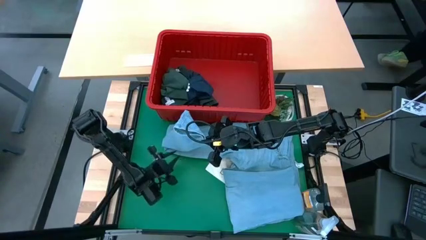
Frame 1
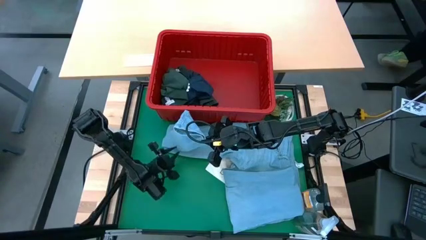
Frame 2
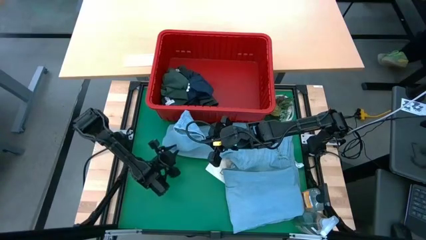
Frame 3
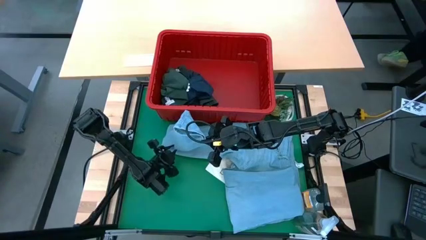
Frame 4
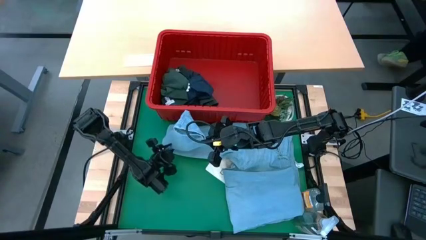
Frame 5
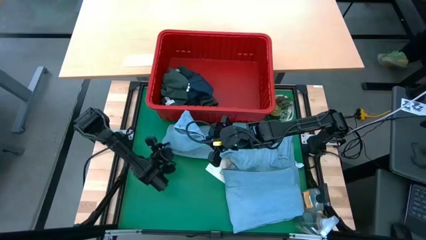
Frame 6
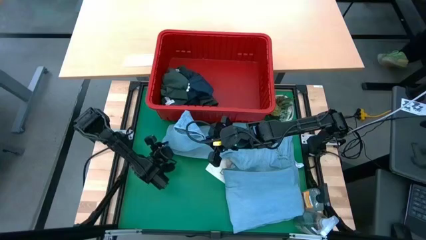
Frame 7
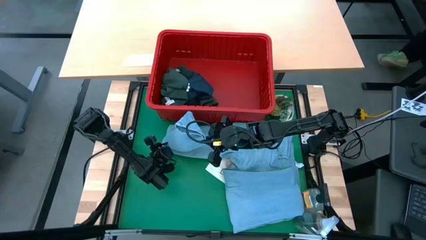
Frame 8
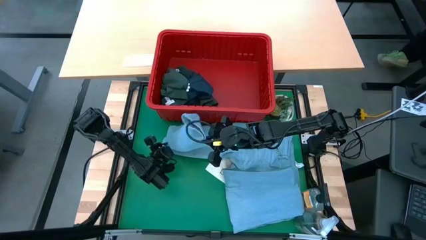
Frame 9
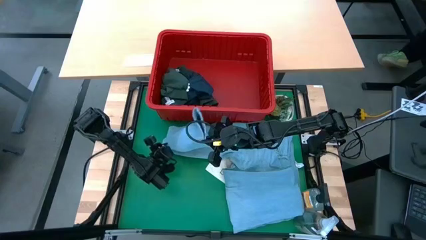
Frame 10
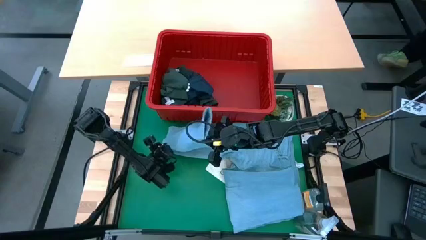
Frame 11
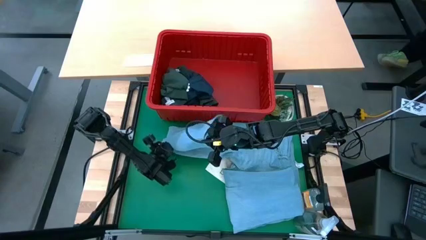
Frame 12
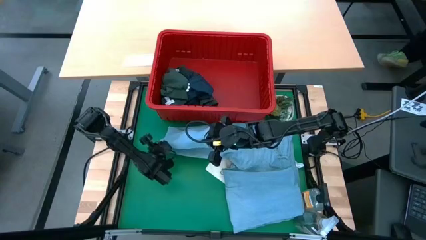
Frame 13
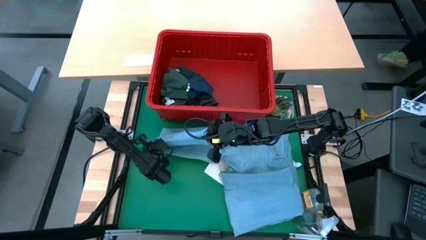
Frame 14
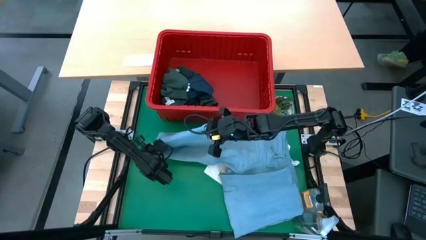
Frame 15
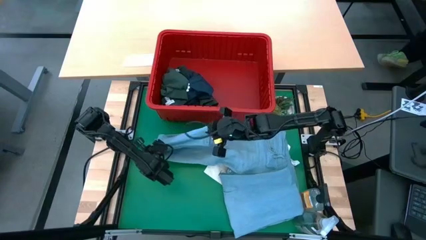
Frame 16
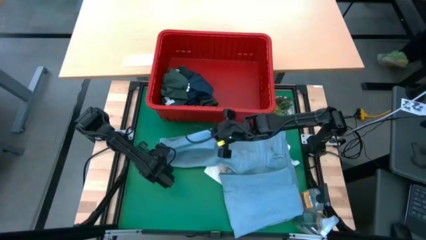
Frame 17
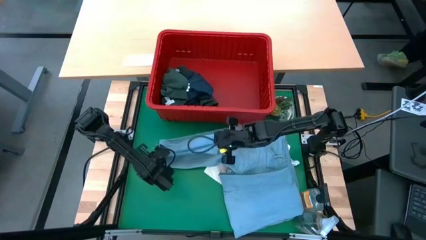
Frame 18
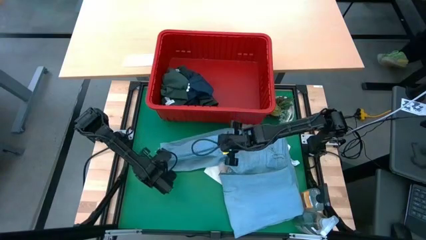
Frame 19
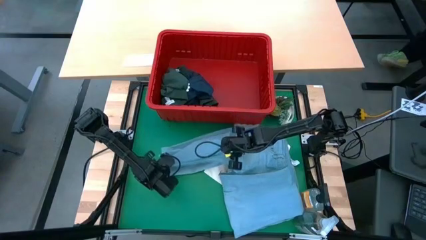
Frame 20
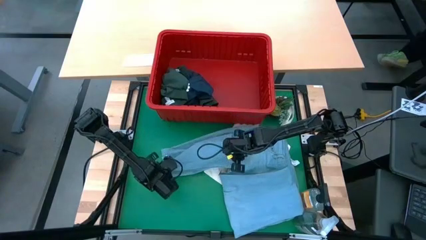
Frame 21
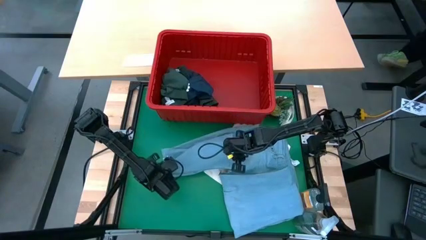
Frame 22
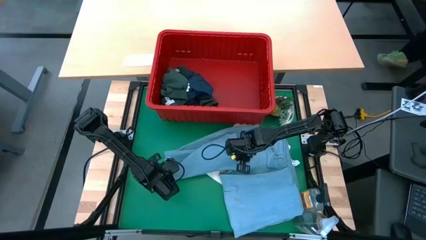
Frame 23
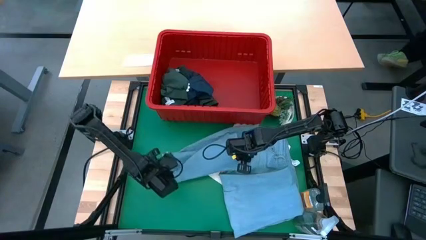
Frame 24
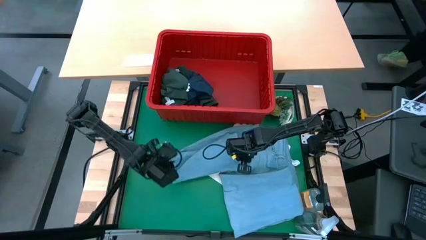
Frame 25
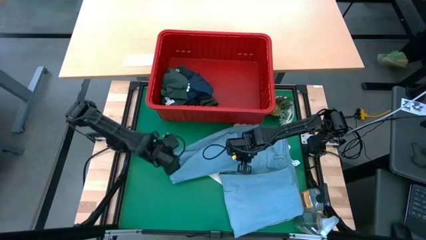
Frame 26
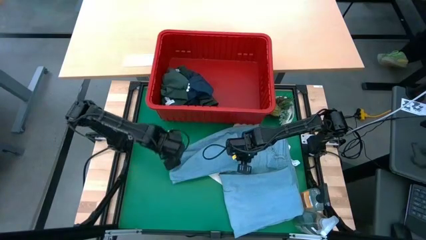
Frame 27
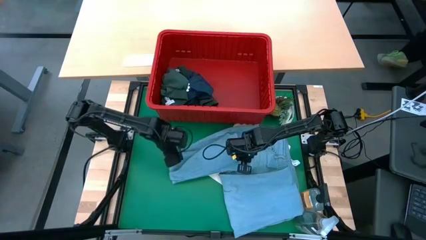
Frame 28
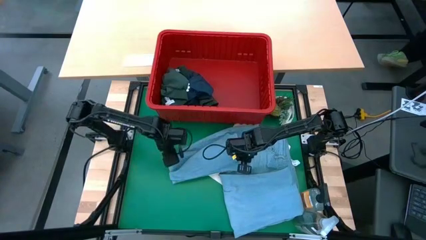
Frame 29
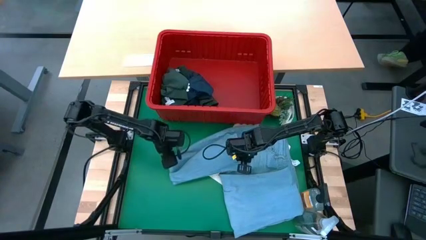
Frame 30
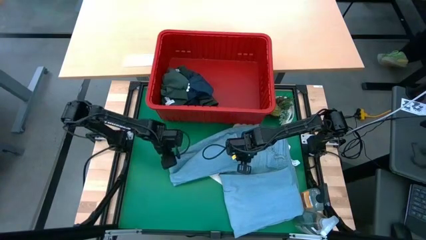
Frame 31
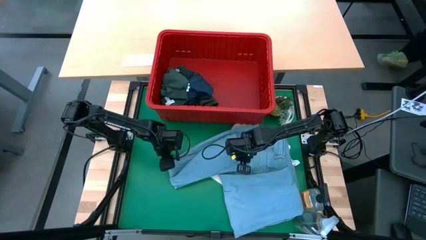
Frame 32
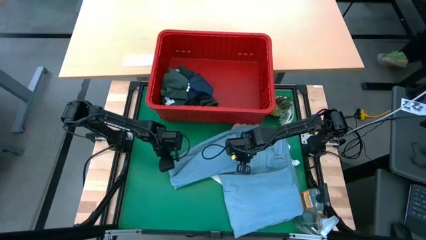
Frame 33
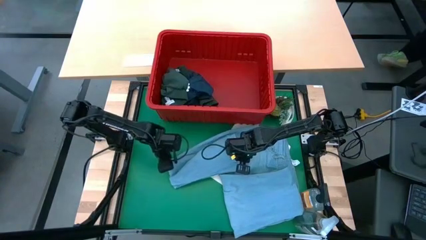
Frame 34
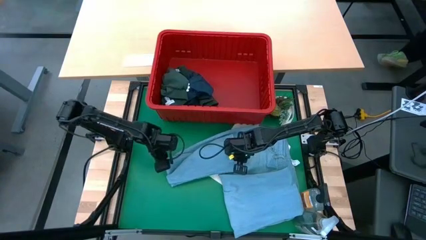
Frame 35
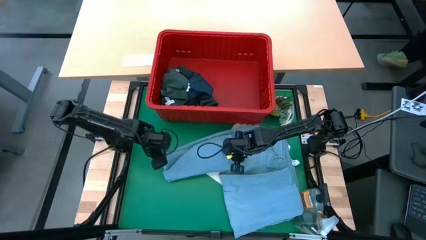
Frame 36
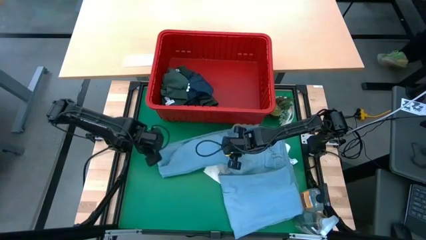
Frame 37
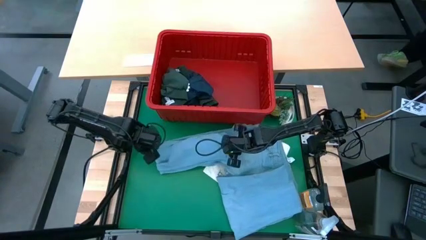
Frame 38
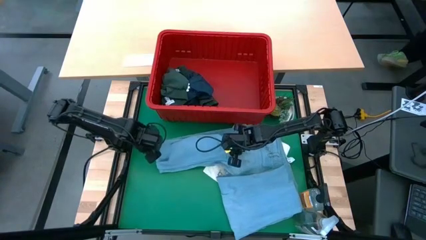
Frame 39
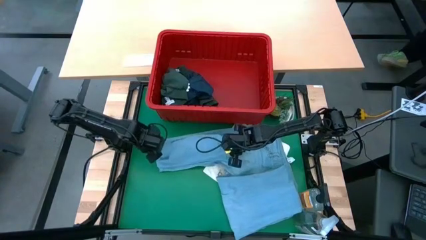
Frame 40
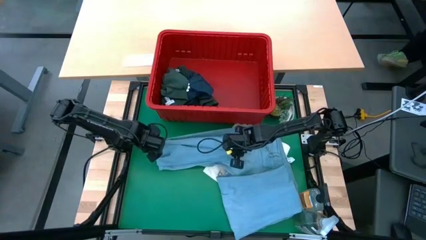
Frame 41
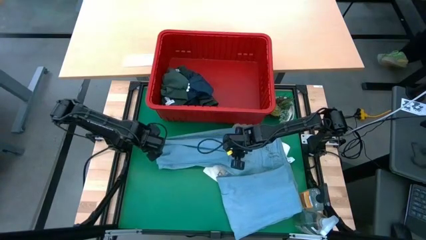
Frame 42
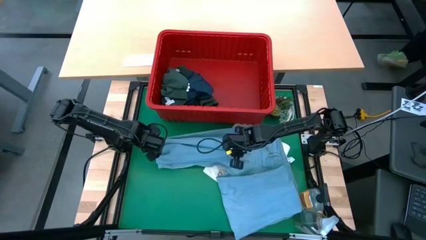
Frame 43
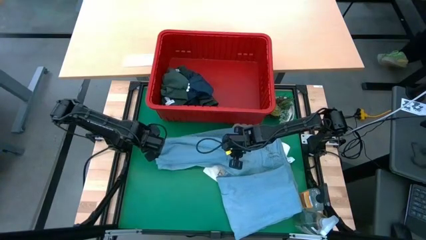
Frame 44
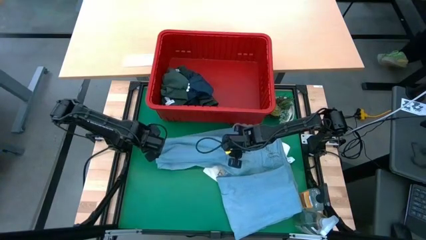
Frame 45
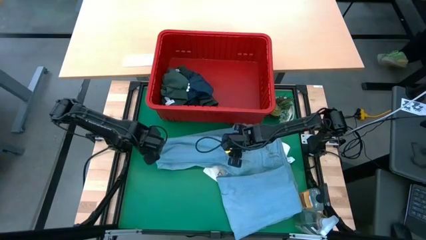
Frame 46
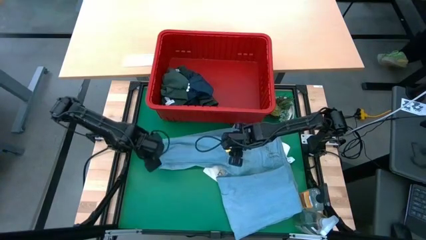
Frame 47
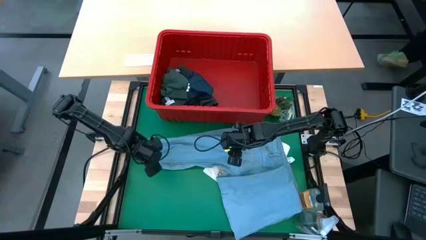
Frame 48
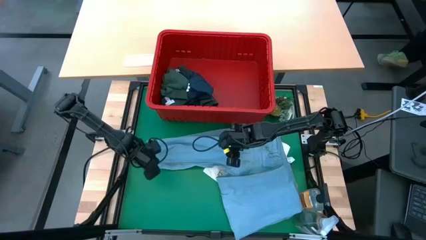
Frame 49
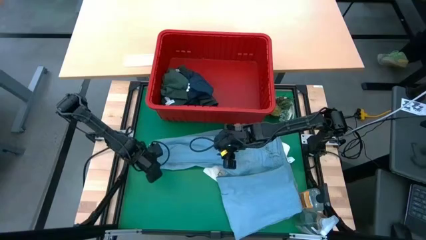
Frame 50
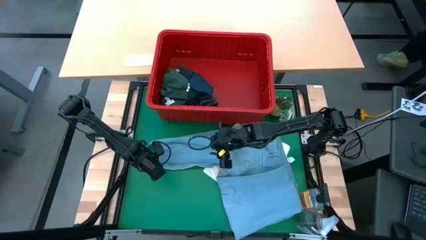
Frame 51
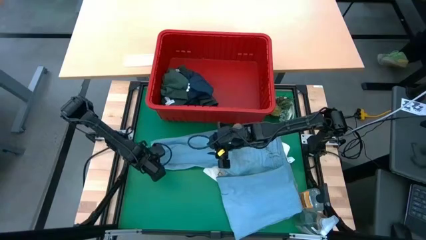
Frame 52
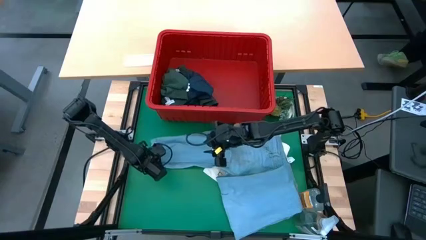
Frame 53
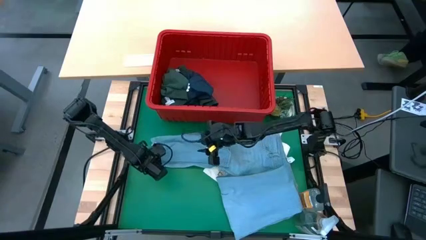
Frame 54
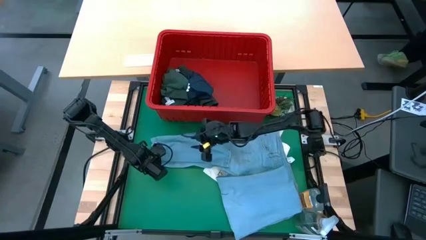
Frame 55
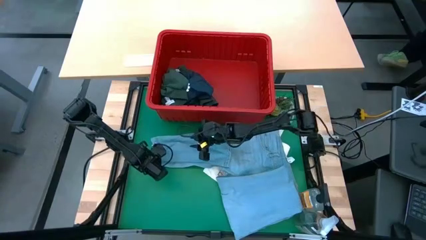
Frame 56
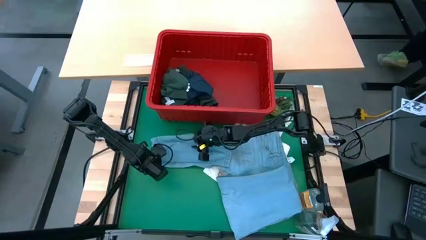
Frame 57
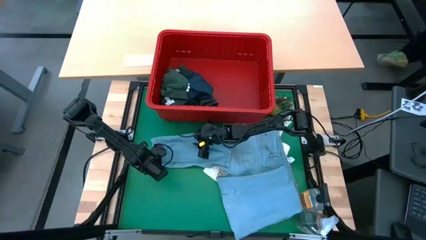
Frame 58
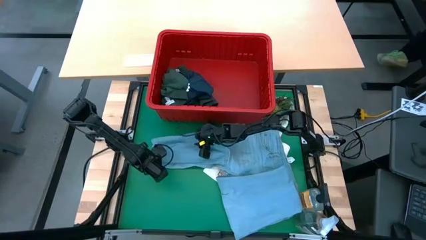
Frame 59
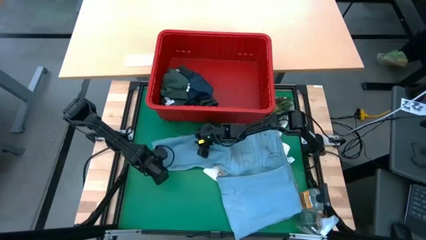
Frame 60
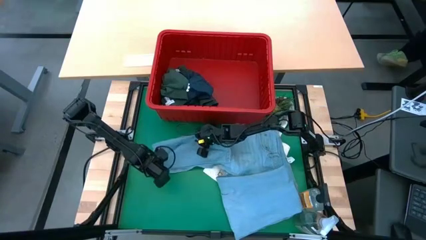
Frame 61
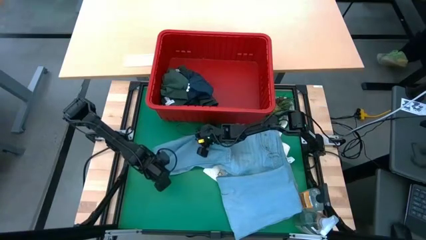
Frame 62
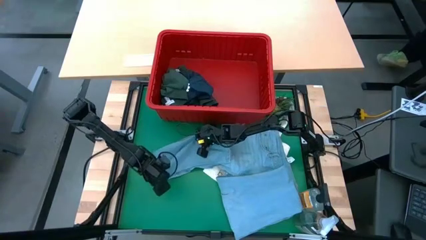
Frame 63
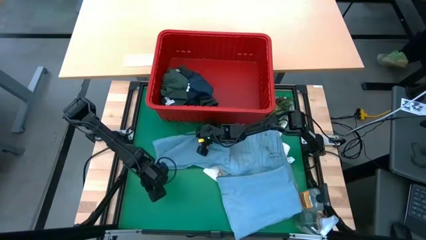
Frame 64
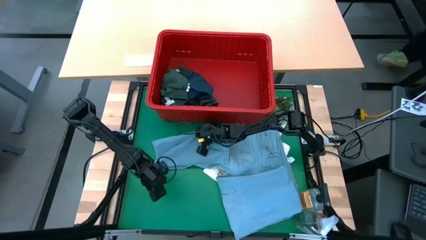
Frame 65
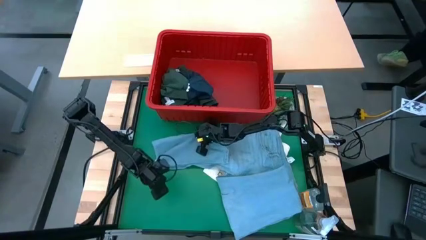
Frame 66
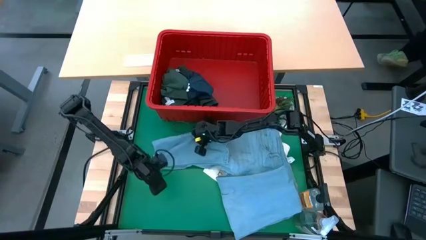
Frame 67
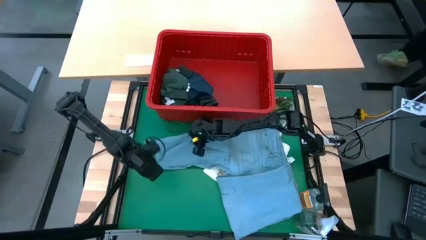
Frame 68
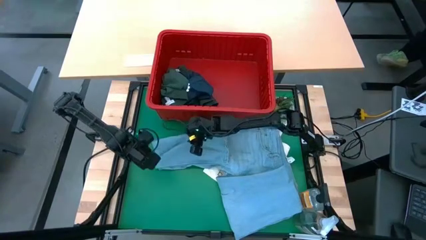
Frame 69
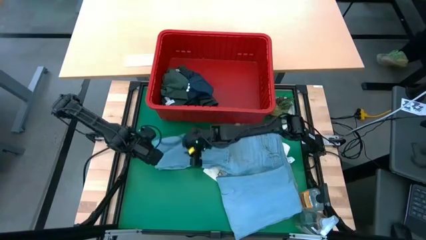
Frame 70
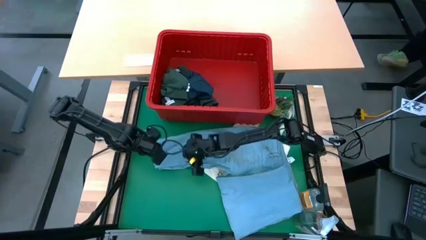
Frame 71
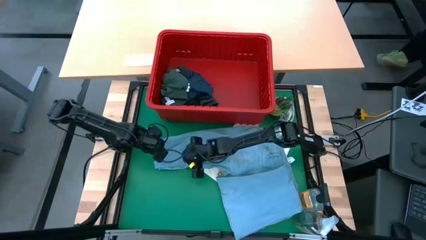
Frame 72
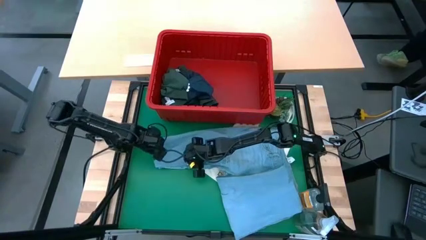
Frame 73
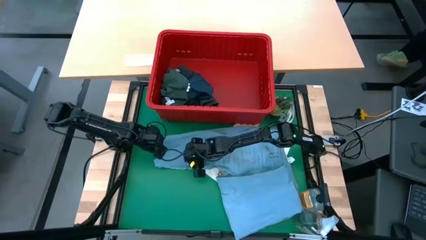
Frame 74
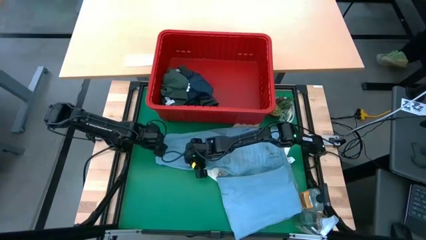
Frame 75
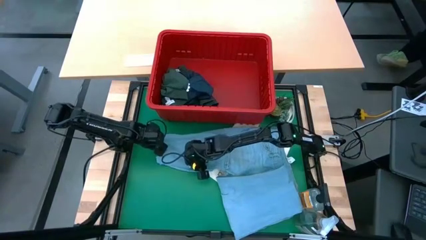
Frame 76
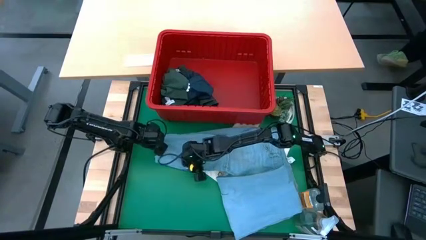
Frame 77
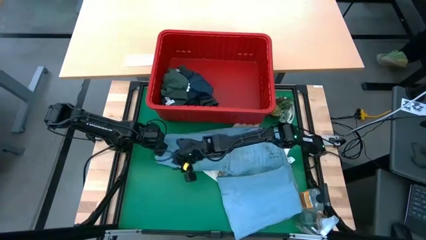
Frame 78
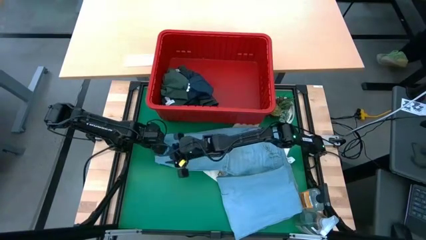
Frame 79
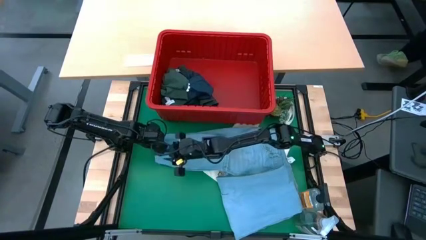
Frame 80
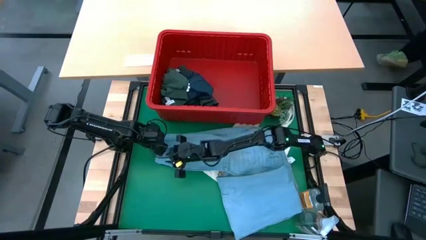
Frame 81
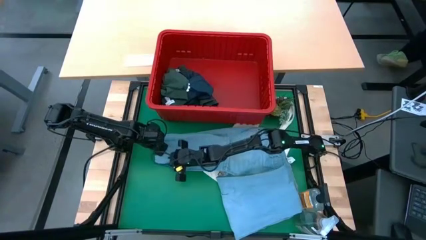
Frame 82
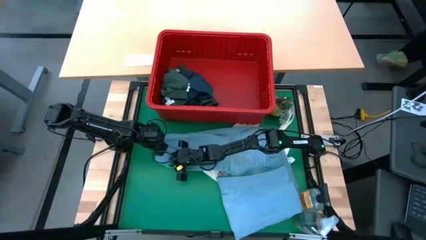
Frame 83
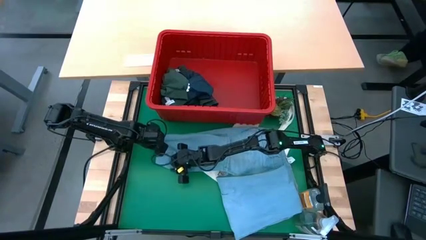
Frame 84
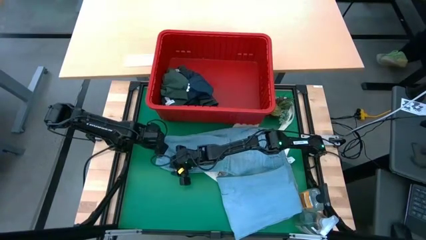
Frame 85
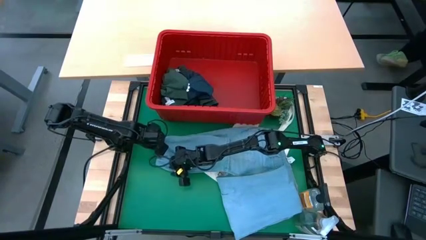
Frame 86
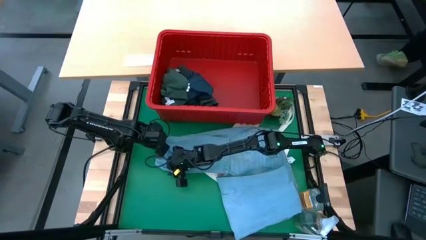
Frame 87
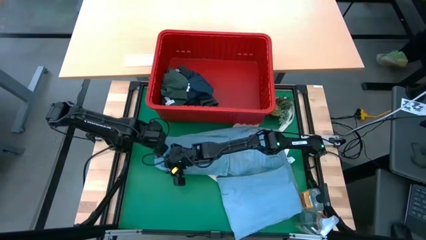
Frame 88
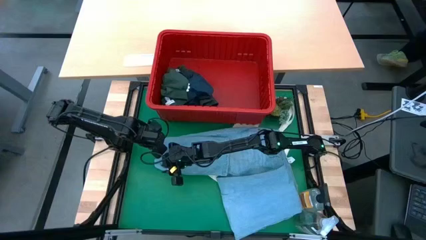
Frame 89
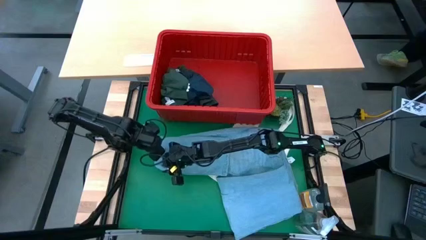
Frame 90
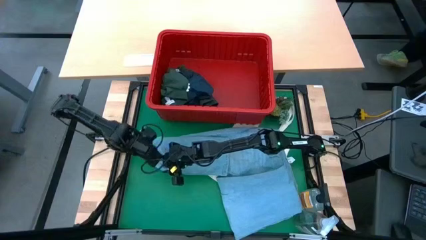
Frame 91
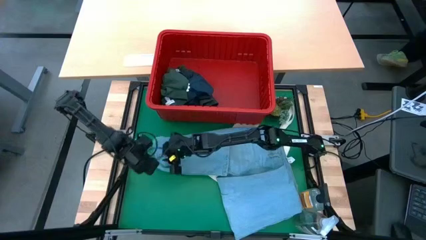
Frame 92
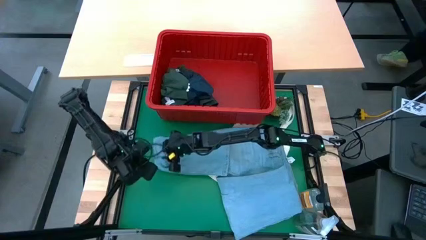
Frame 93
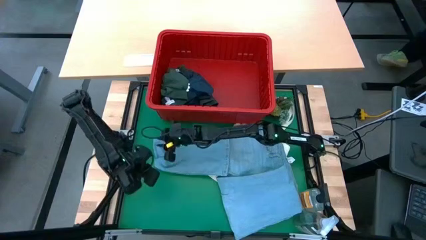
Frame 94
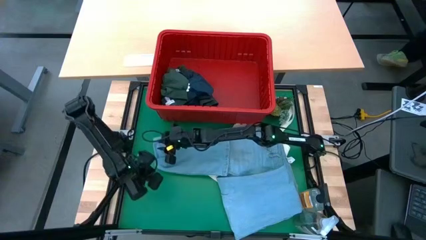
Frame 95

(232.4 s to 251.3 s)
Task: Fold Laundry from Bin
Fold the light blue jeans
